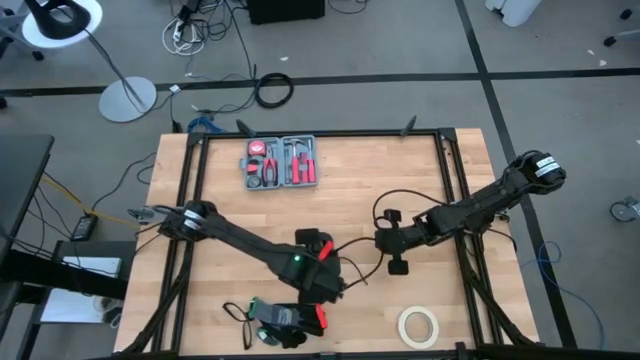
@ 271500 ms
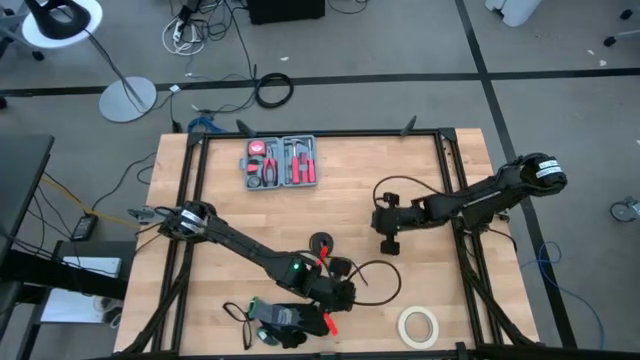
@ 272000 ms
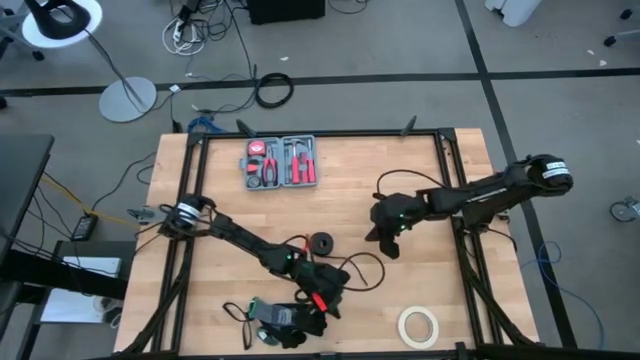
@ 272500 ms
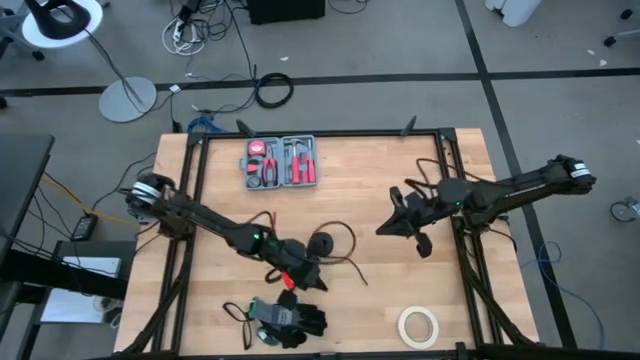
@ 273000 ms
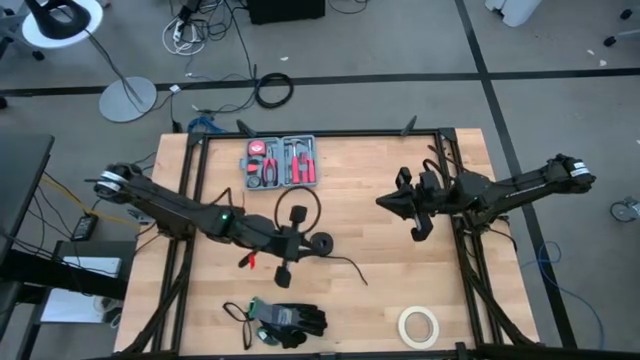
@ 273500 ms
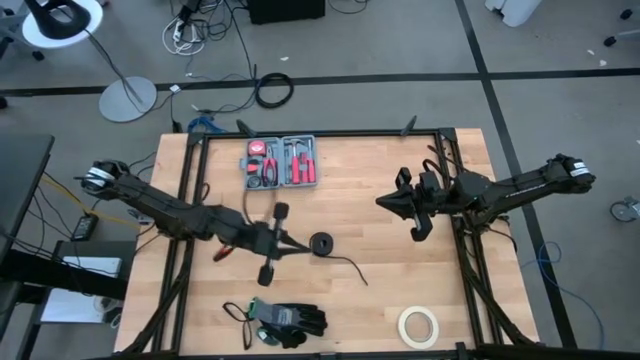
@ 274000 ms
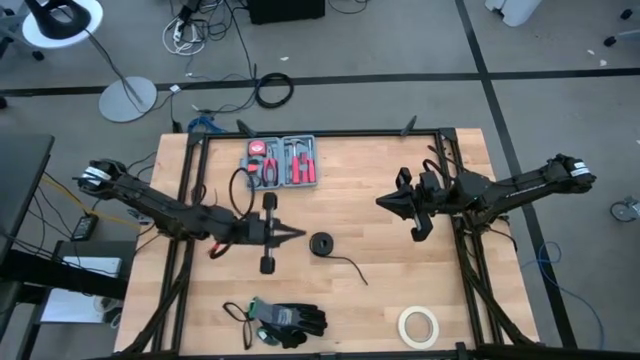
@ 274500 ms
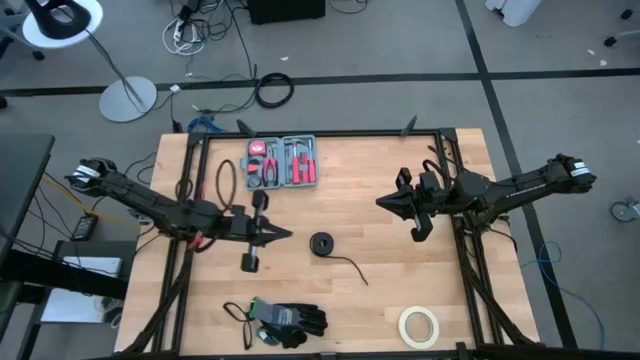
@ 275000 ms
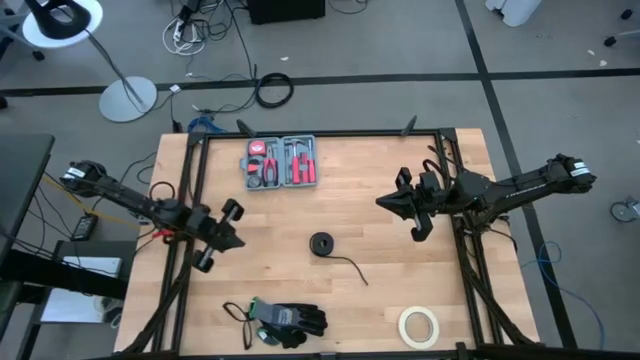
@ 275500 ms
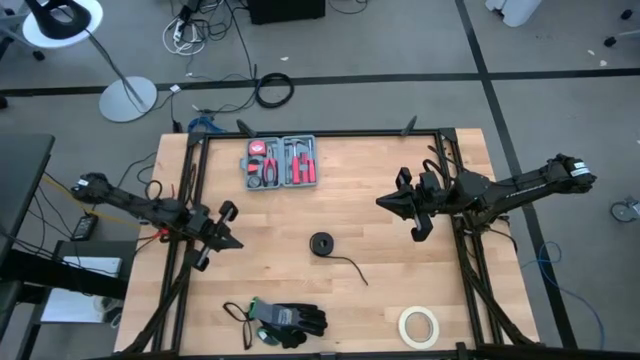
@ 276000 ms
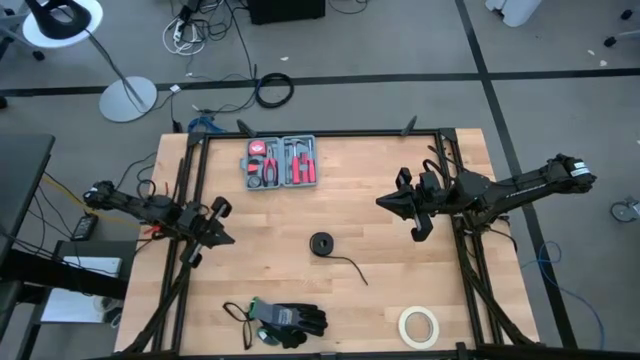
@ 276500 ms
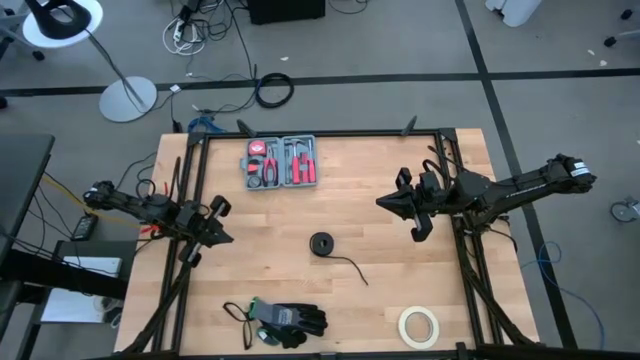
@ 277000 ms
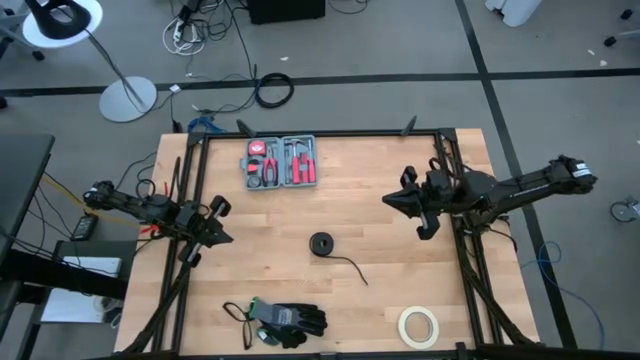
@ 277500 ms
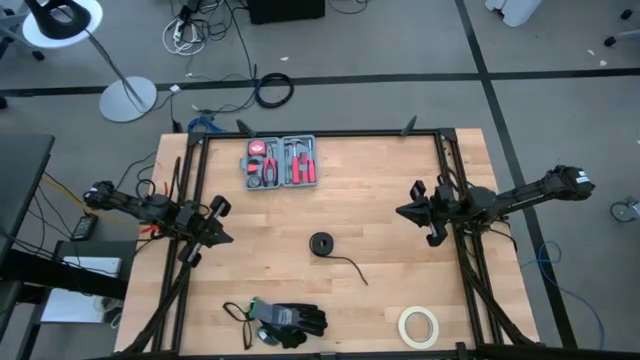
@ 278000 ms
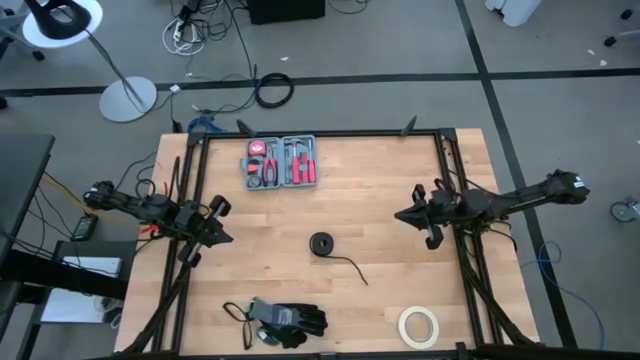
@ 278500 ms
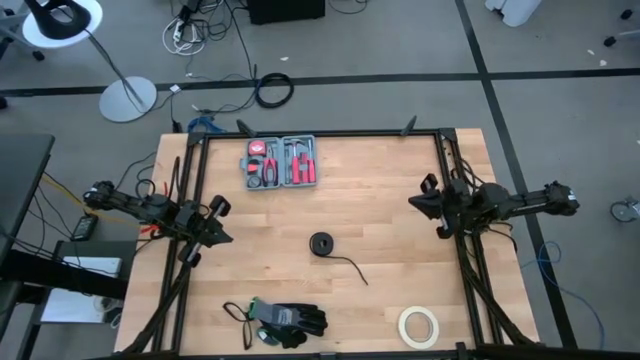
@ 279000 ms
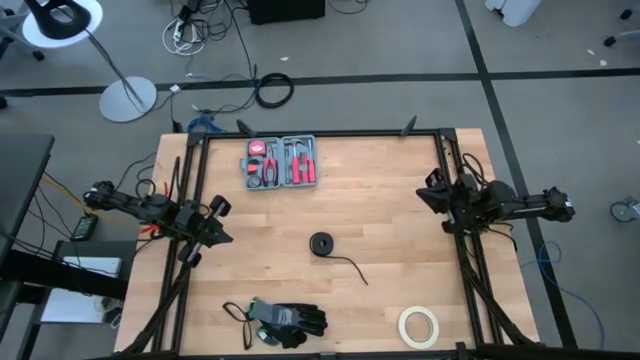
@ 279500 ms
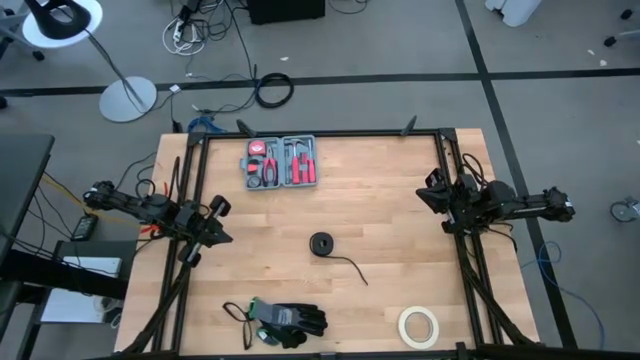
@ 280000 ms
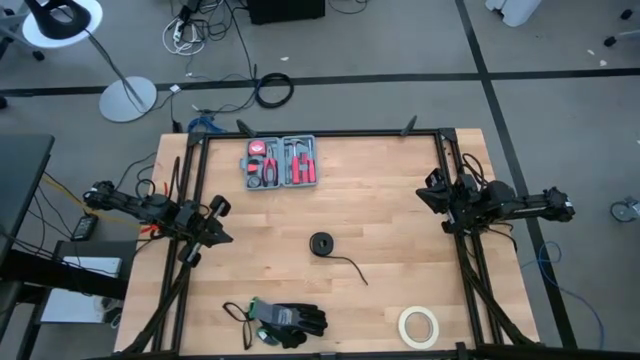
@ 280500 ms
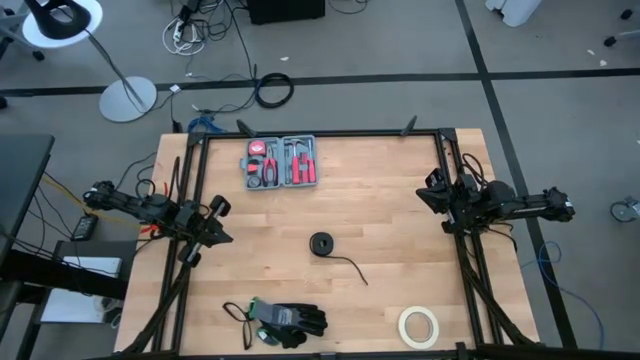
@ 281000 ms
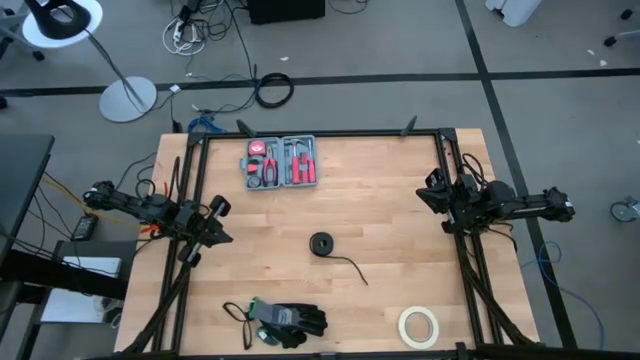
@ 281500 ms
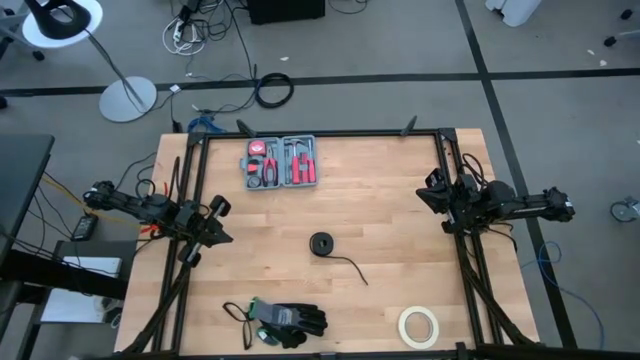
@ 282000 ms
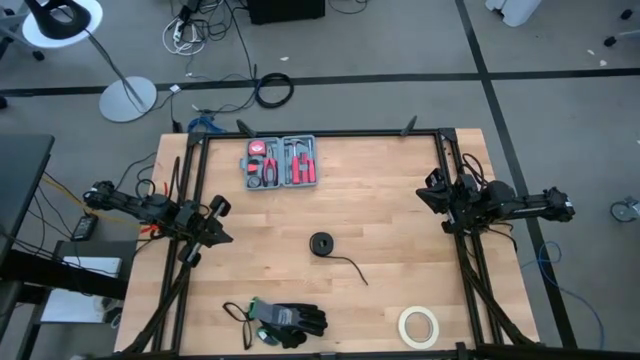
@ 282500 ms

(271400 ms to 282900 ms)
Task: Coil cords
Return to Home Position

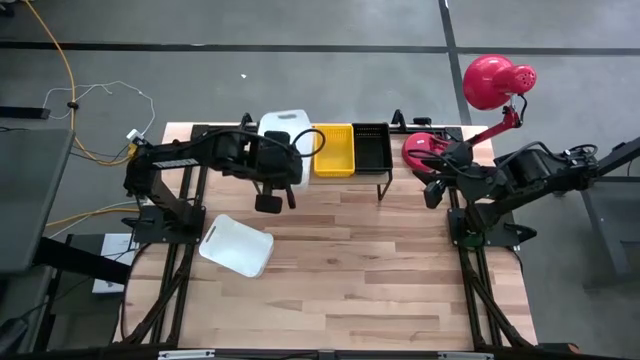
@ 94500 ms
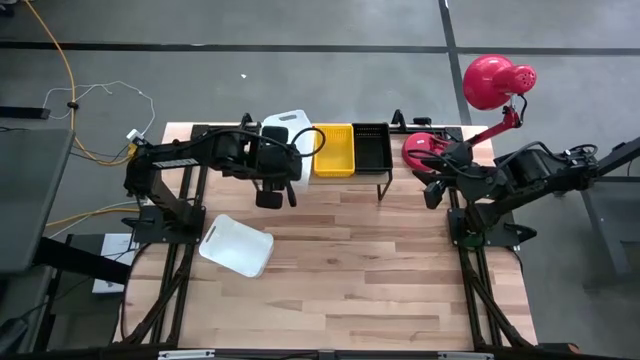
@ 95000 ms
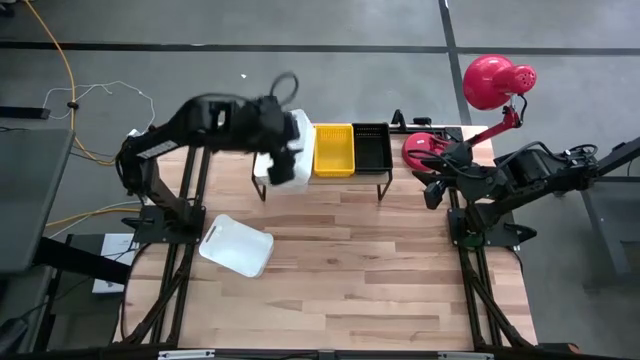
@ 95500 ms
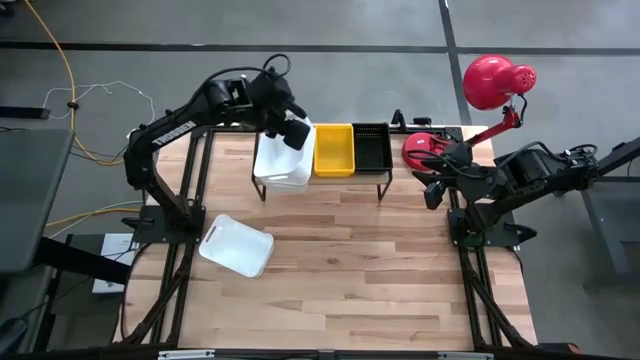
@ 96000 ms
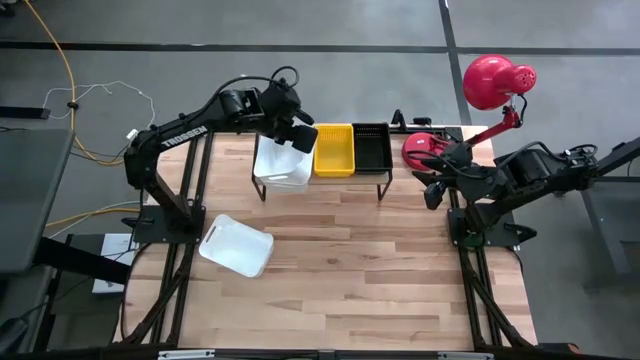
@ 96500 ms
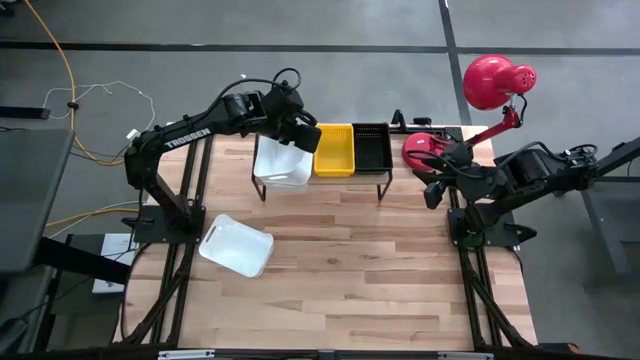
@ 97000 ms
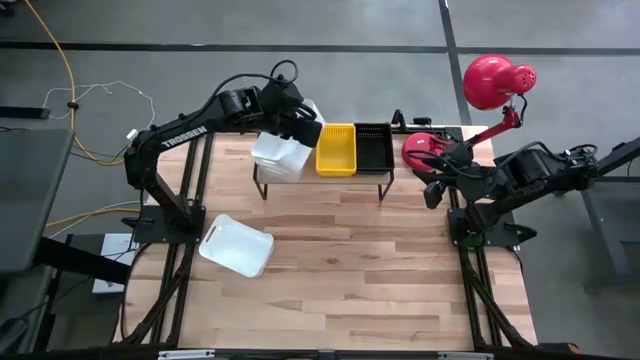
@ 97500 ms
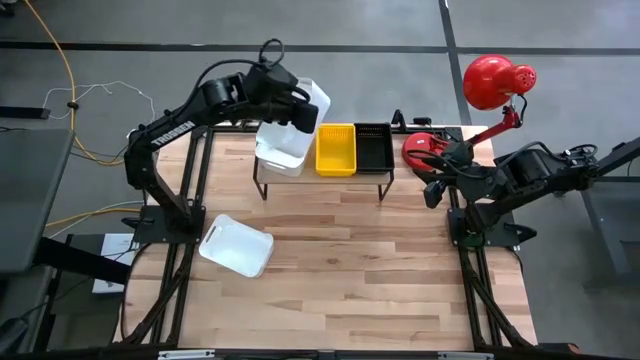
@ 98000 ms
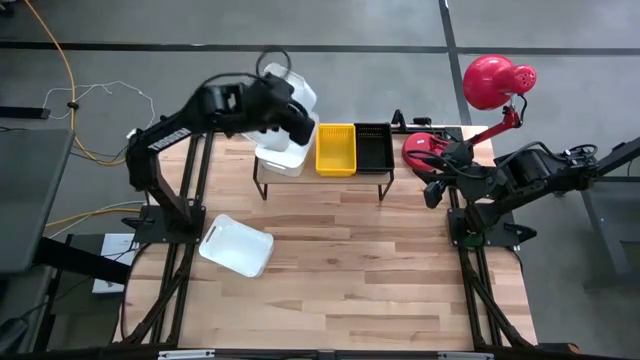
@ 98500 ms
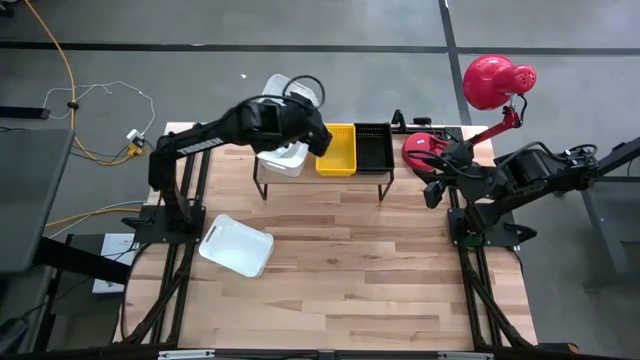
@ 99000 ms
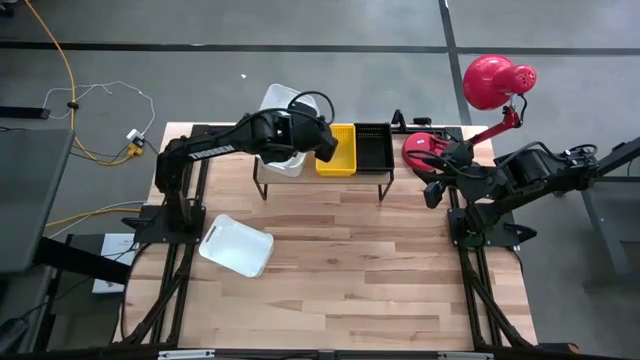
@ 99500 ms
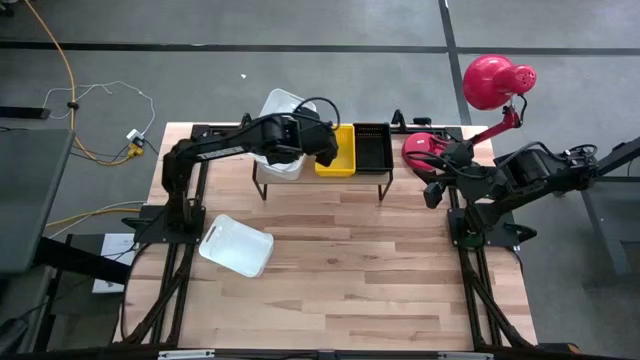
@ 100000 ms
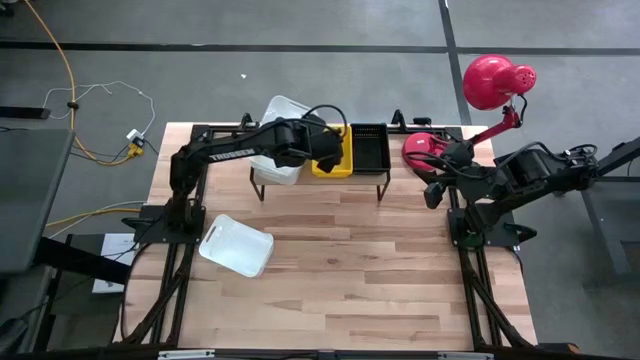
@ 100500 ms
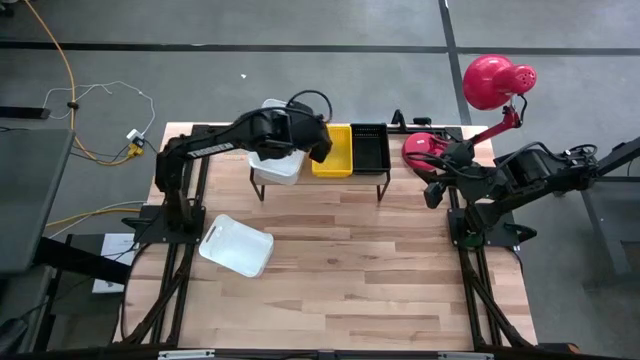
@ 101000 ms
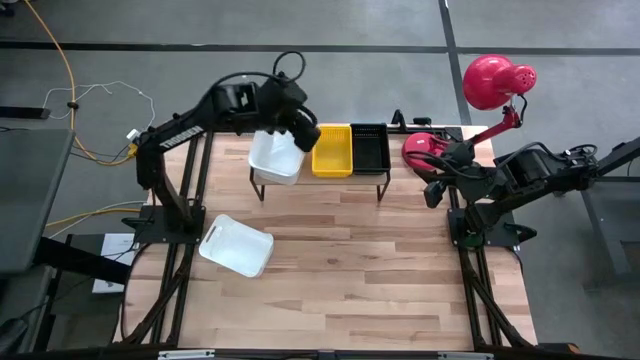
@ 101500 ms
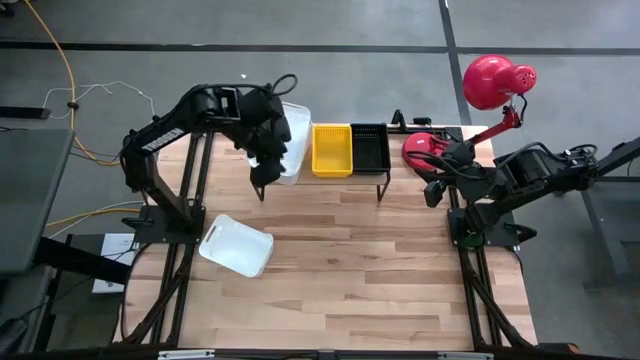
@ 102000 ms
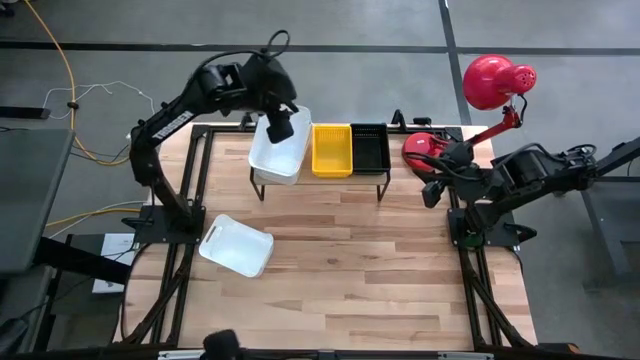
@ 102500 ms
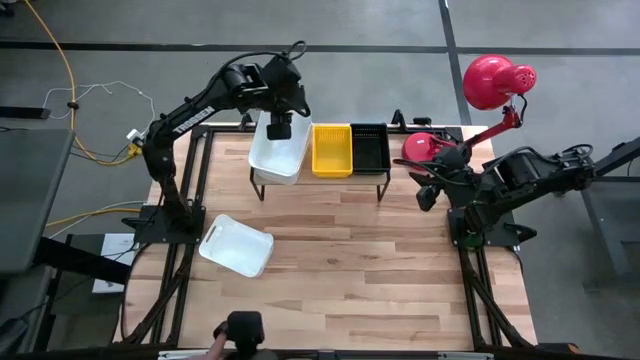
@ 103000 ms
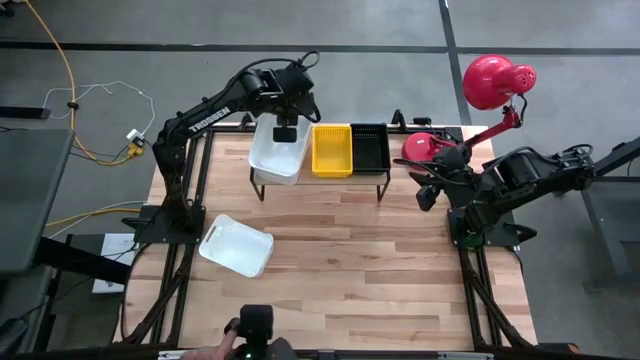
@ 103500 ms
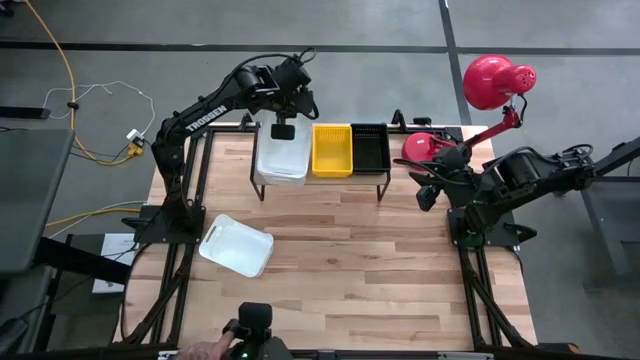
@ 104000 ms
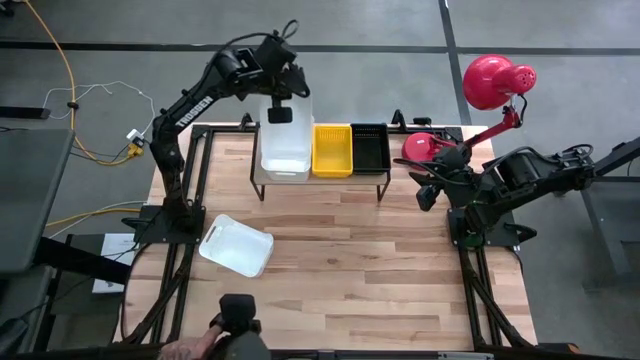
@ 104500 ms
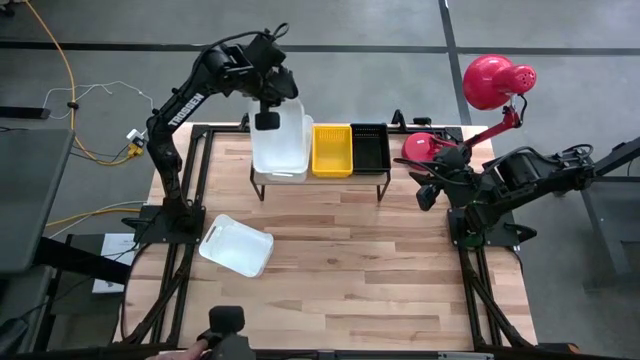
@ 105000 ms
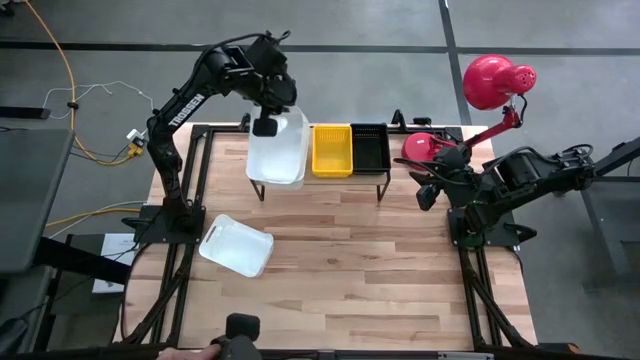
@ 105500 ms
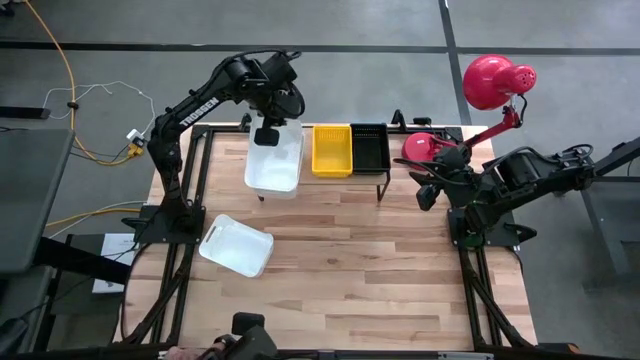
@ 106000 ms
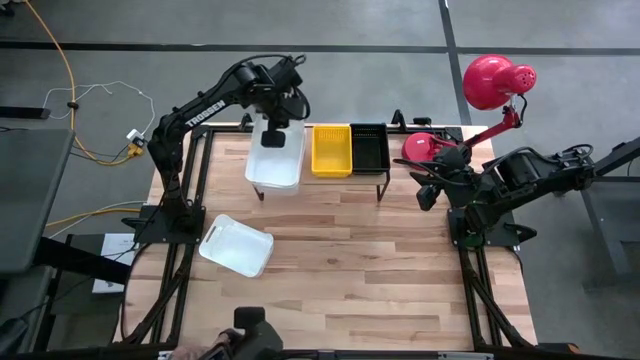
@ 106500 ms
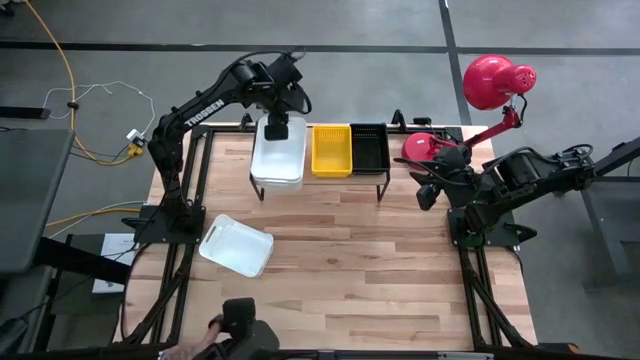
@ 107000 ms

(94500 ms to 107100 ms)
Task: Stack baskets on shelf by color
Stack the top white bin into the white bin on the shelf
